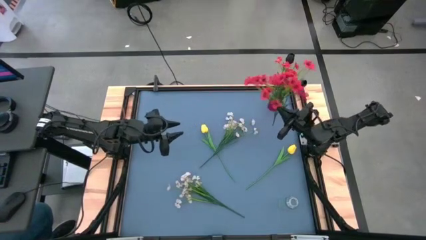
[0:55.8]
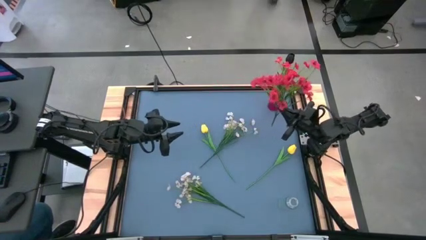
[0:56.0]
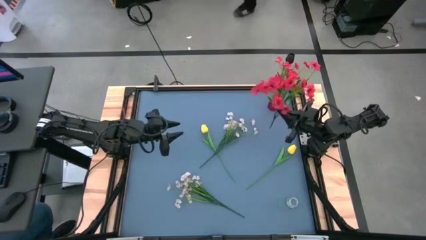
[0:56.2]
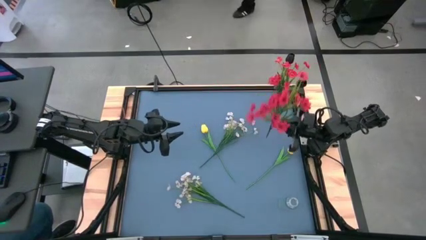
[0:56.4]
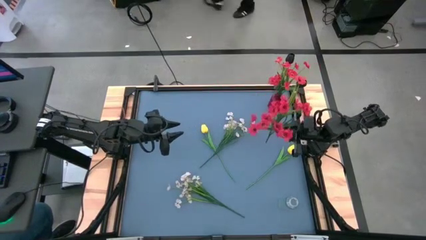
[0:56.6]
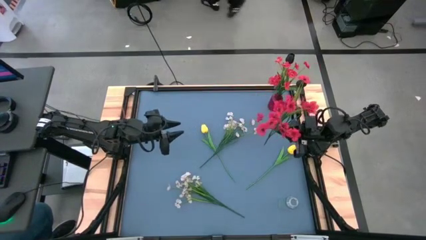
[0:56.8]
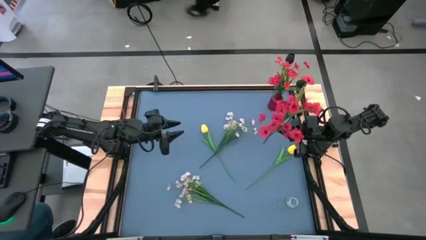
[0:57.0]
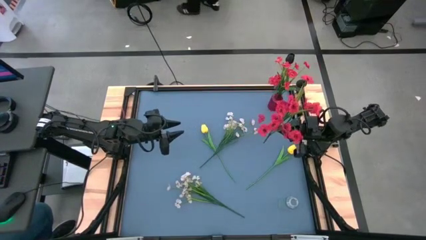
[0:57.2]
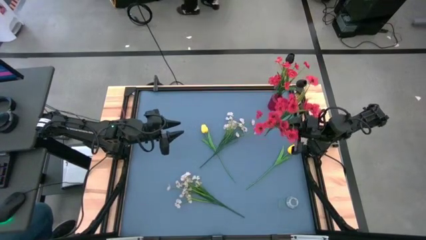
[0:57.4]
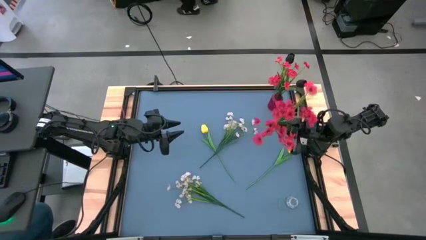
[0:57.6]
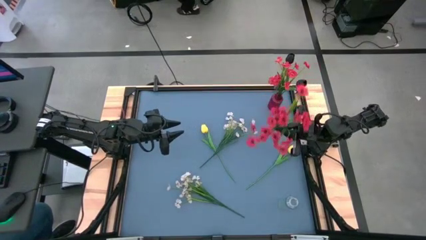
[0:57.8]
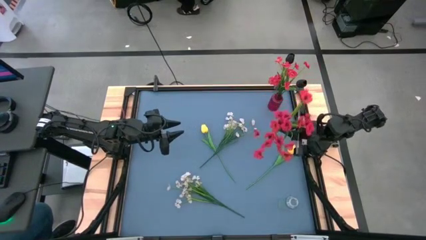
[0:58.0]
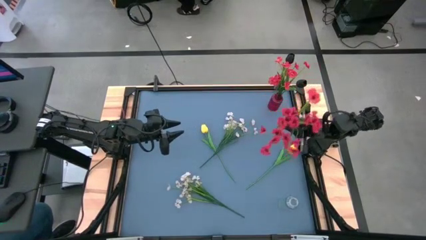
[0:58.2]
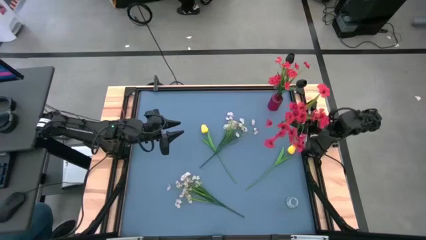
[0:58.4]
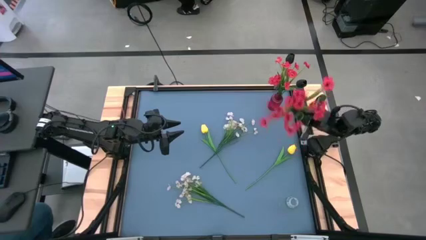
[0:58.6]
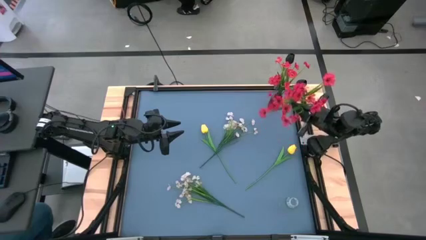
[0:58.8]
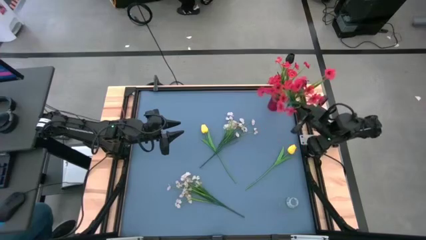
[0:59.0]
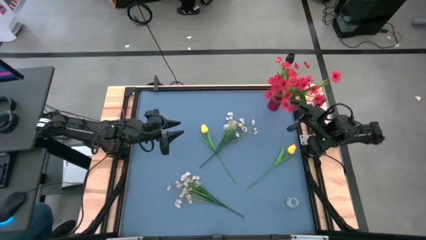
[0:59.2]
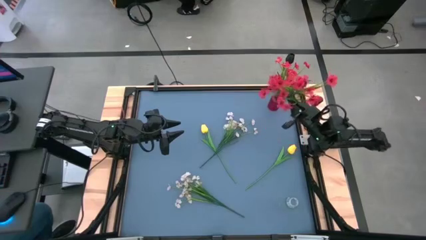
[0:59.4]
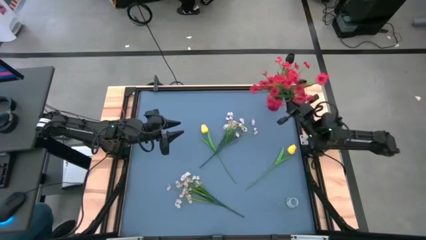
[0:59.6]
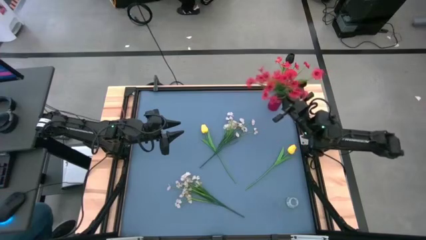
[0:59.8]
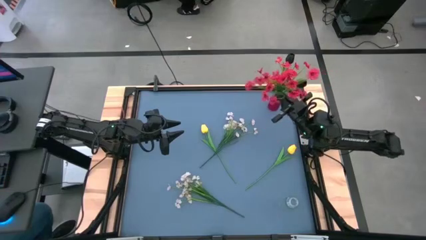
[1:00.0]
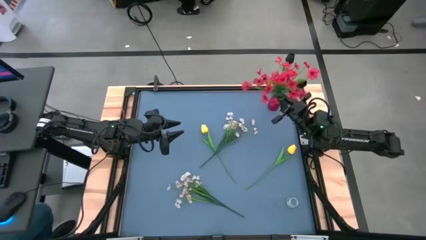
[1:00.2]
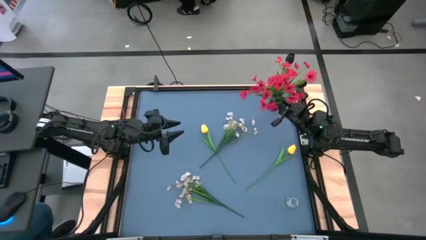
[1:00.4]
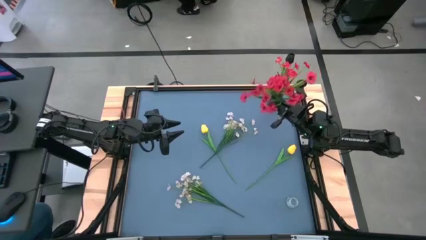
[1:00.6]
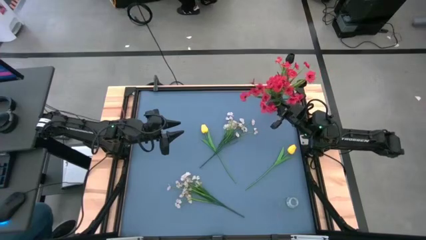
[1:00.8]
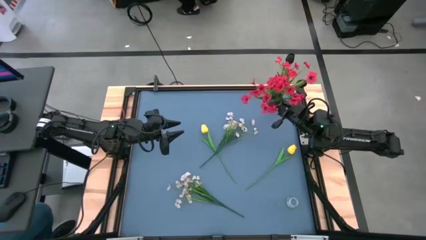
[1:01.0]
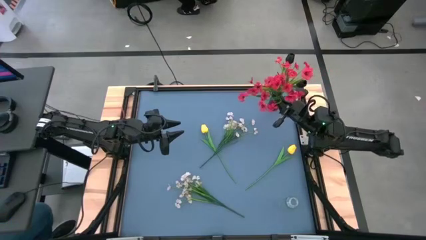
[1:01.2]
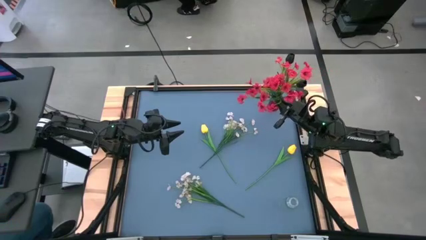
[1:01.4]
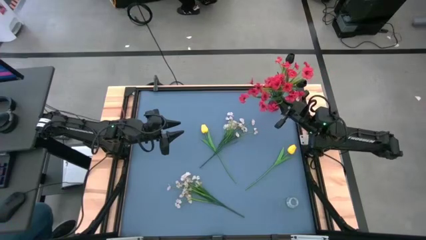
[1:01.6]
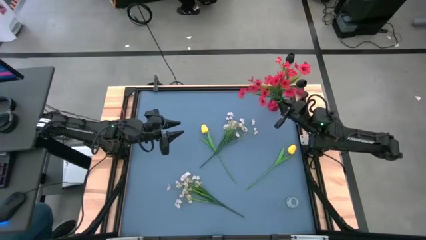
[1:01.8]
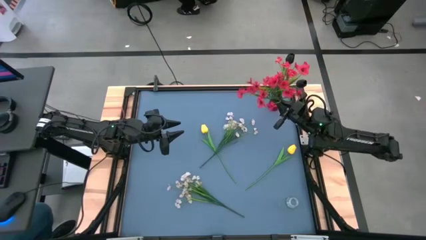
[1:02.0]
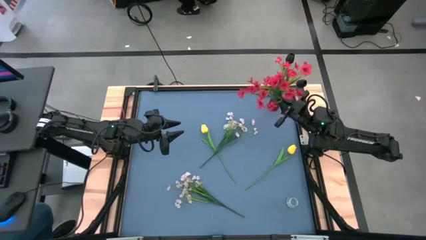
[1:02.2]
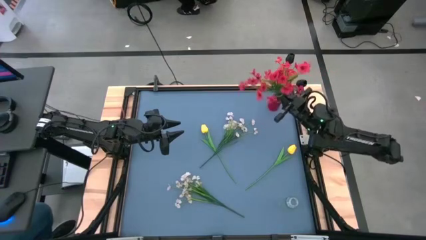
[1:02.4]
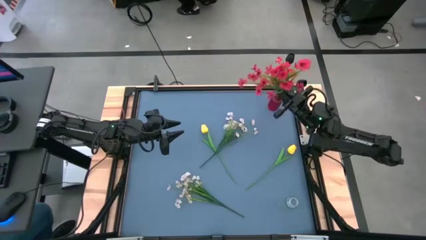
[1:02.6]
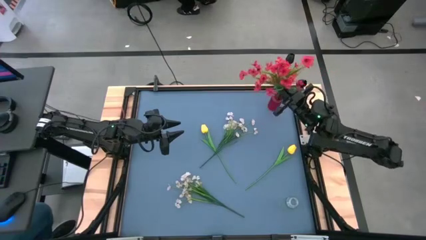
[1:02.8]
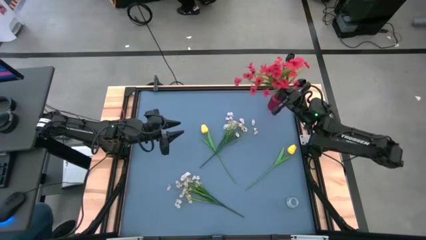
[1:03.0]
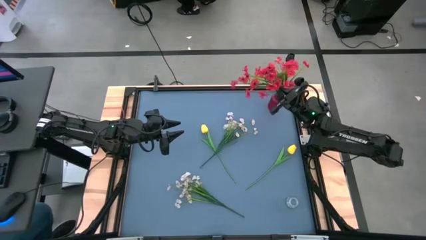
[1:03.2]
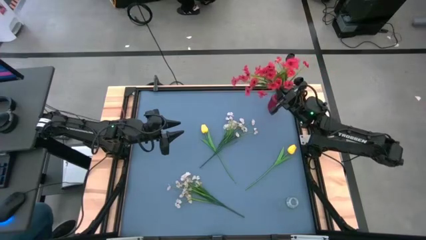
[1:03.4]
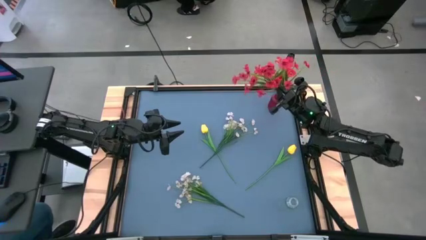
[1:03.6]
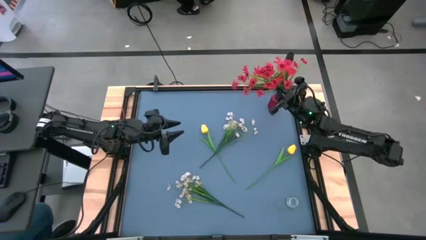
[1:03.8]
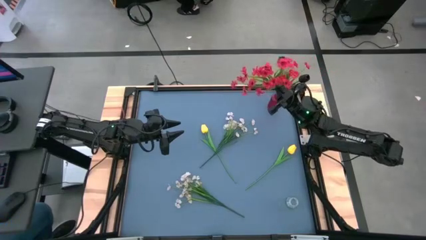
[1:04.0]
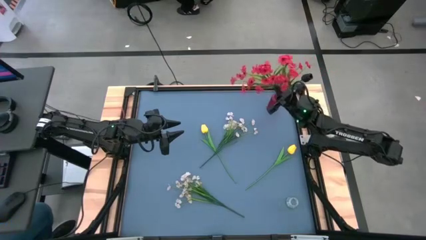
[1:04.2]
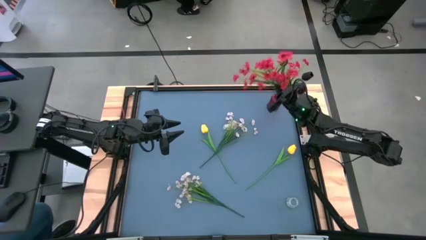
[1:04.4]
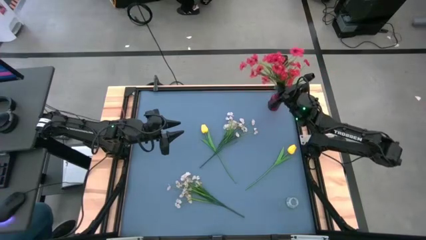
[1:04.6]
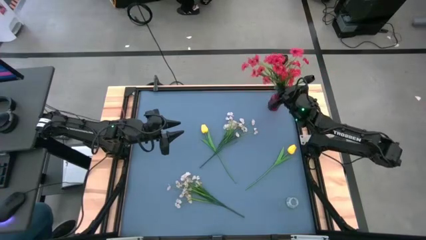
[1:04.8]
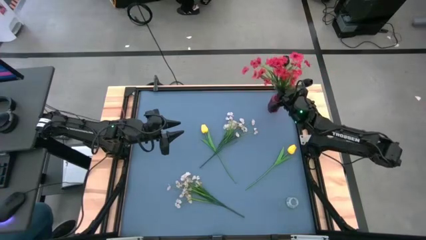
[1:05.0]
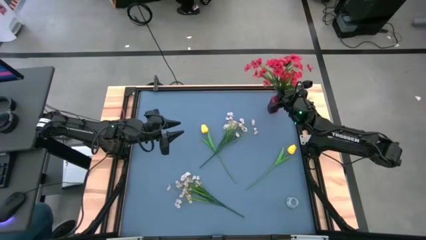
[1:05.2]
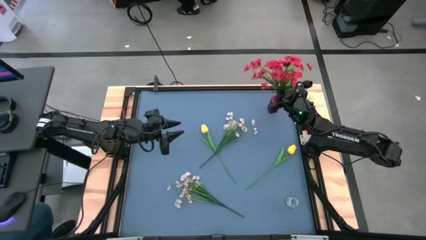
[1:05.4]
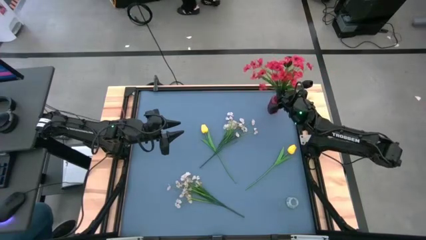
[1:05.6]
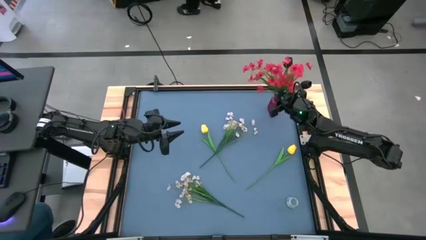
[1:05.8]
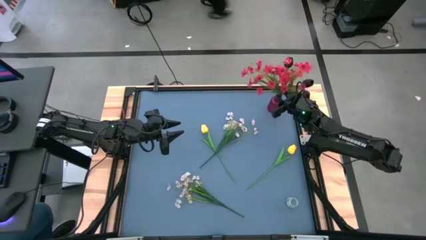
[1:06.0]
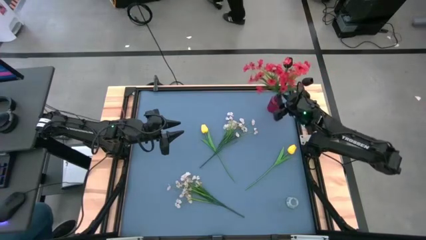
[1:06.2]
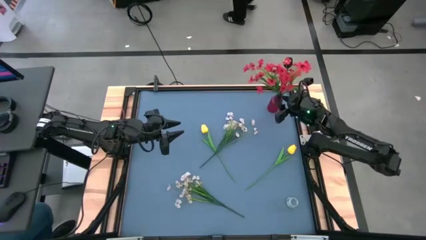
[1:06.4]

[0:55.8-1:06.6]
Task: Sort flowers into vase by color
Put the red flowers into the red glass vase

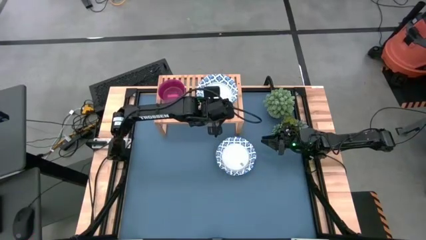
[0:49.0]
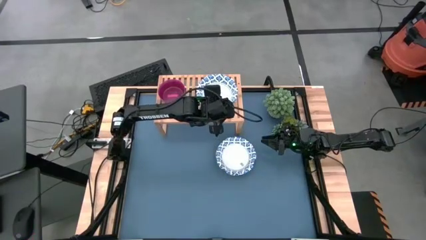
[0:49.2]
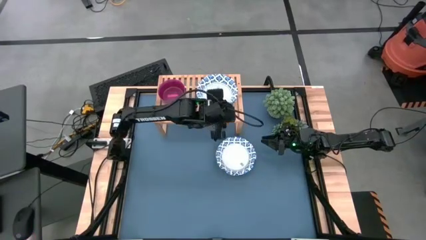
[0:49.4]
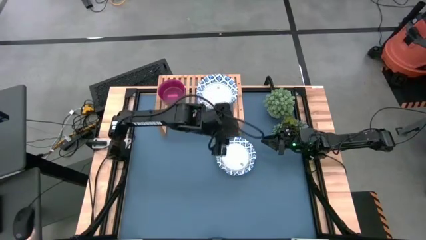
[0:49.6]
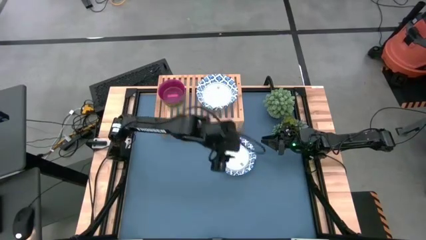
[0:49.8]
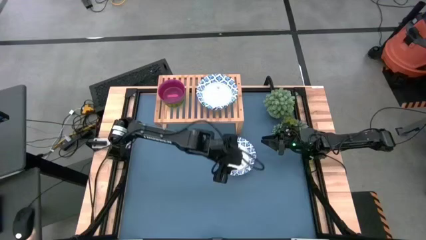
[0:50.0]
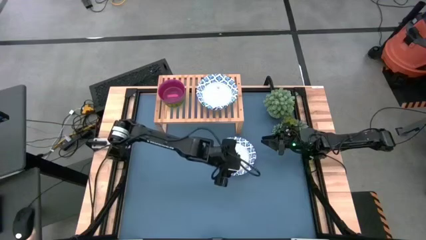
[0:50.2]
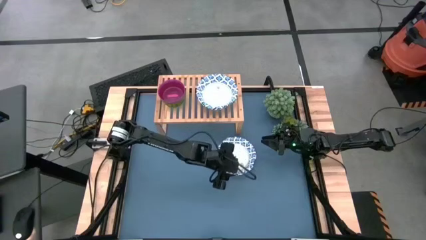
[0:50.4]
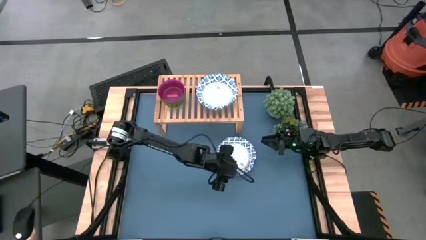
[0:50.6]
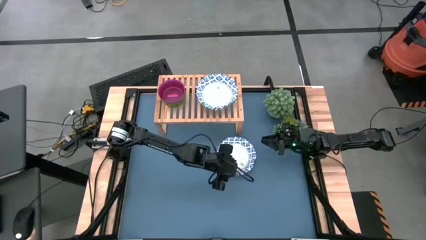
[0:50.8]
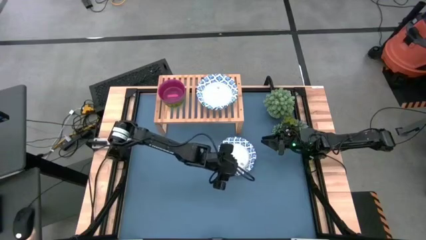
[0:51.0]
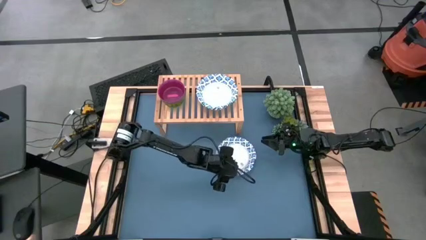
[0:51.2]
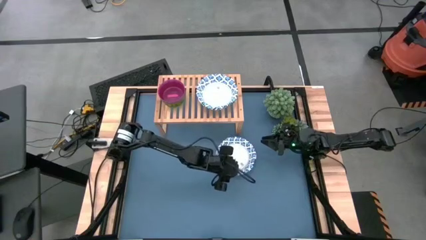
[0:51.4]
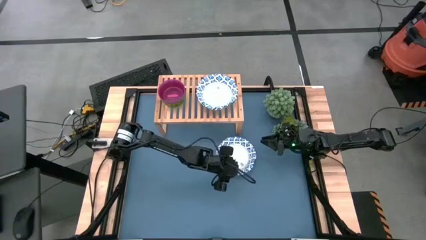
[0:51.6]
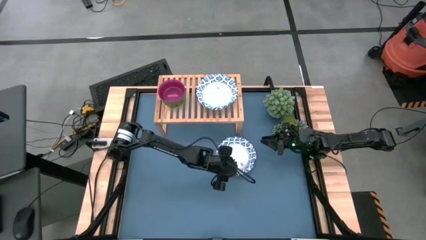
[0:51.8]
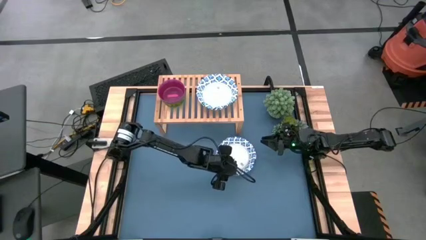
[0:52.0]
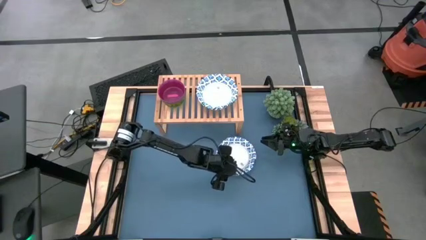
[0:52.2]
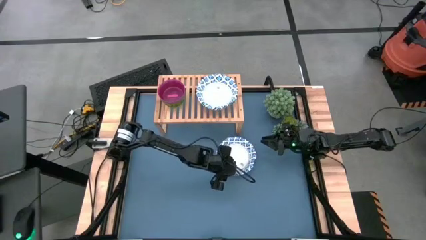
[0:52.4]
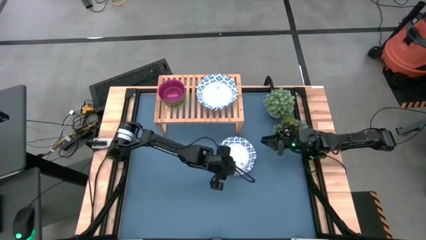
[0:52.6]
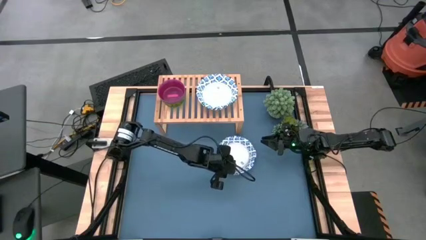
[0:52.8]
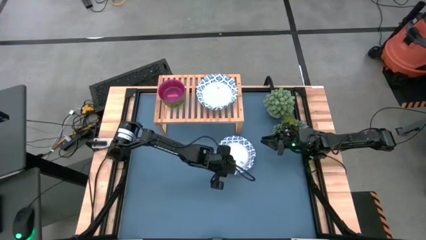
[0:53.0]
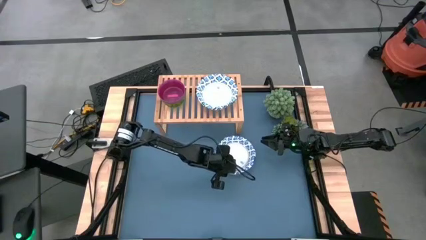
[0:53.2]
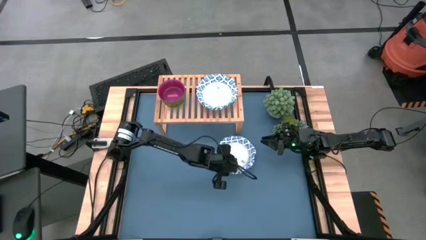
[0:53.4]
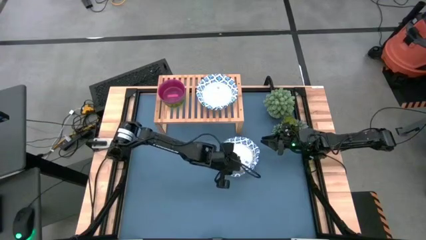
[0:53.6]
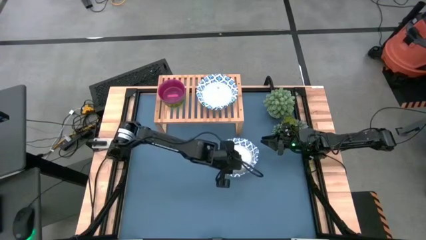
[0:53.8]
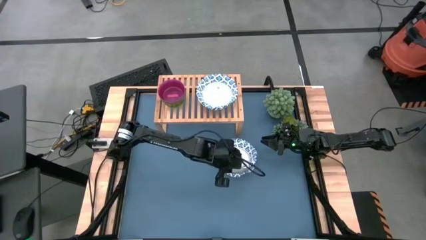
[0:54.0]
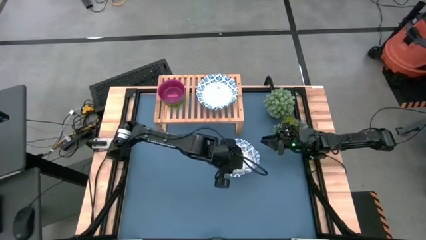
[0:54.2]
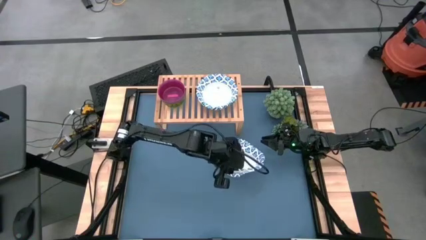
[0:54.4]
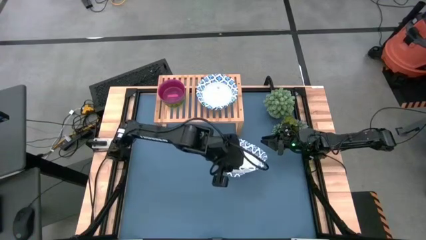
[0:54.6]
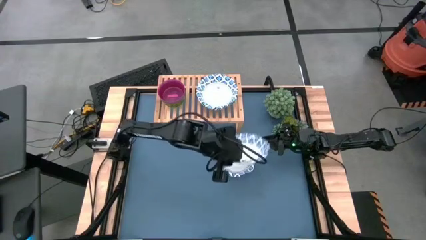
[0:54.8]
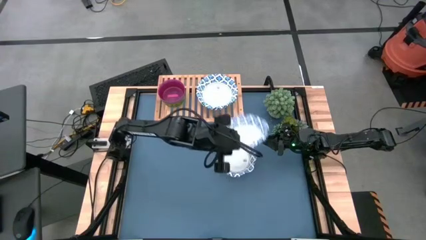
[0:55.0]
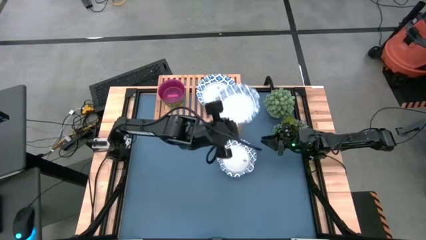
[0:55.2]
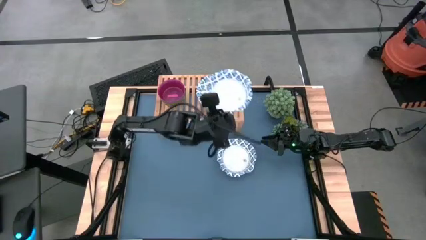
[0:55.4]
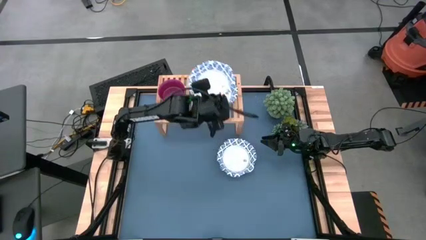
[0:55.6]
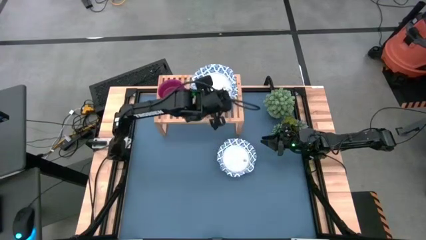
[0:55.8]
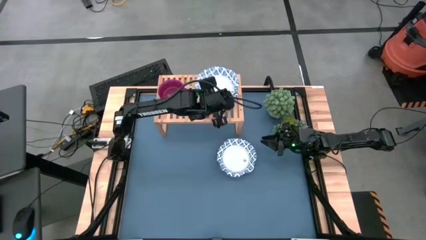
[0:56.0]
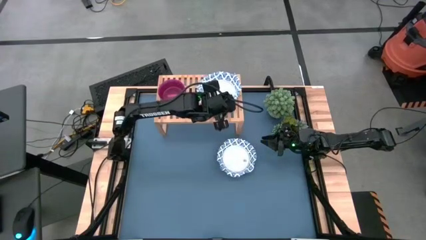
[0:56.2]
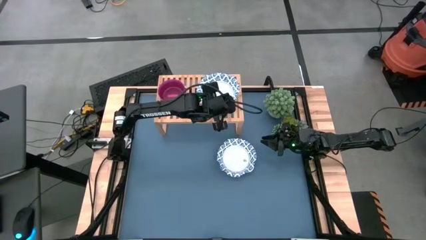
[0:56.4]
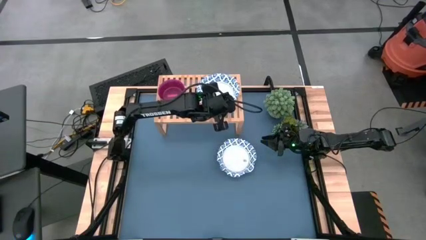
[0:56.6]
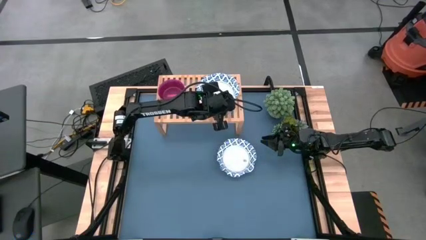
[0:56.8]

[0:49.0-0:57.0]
Task: Place and stack bowls onto a shelf
Stack the blue patterned bowl on top of the other blue patterned bowl on the shelf
